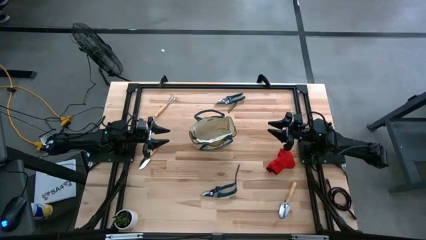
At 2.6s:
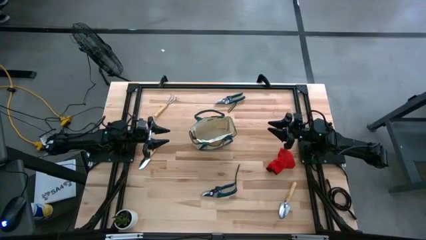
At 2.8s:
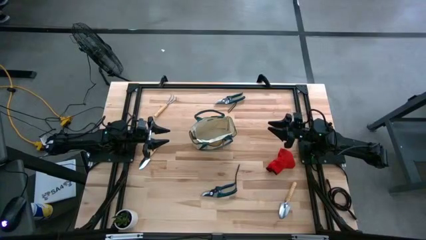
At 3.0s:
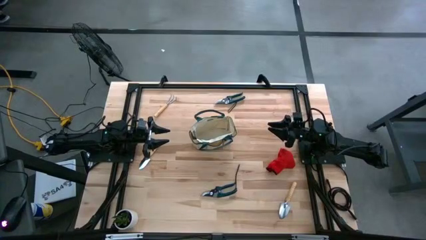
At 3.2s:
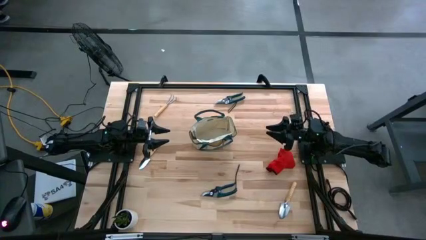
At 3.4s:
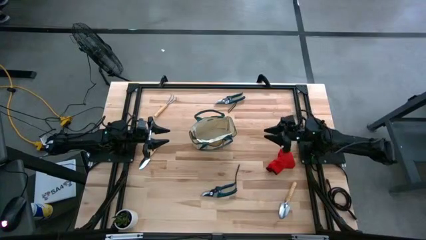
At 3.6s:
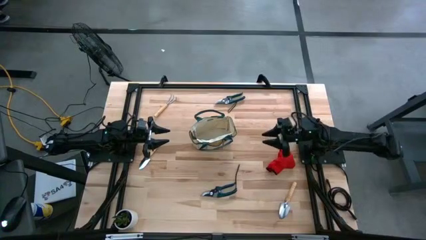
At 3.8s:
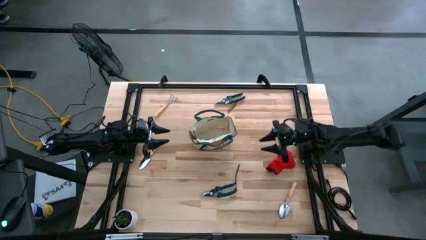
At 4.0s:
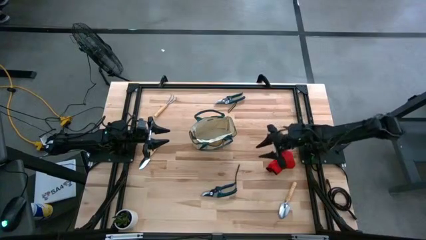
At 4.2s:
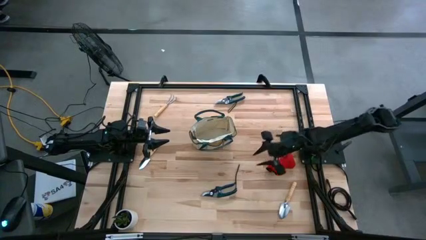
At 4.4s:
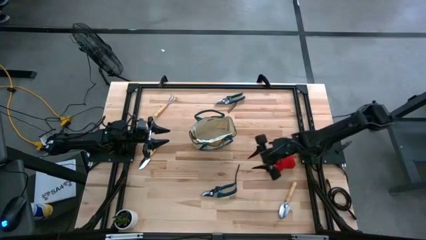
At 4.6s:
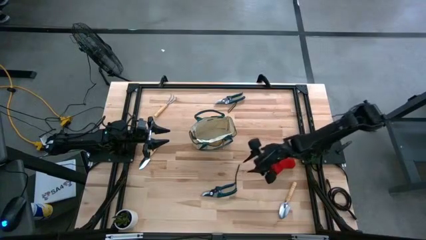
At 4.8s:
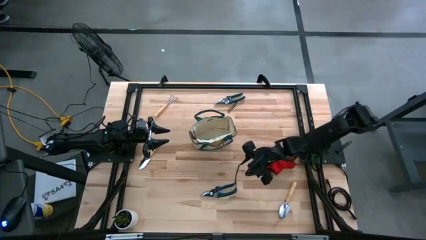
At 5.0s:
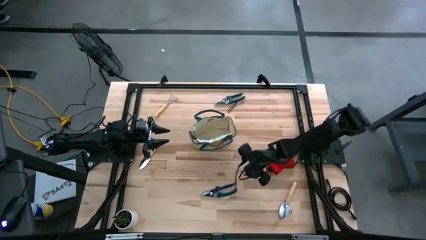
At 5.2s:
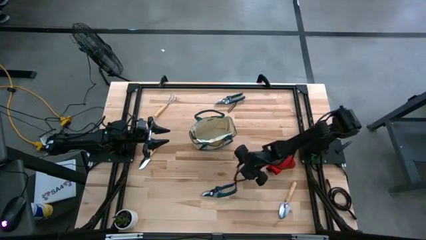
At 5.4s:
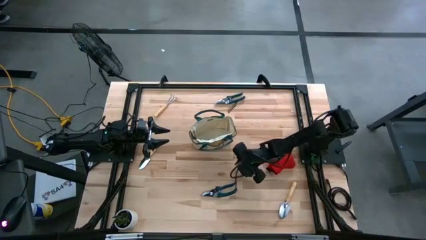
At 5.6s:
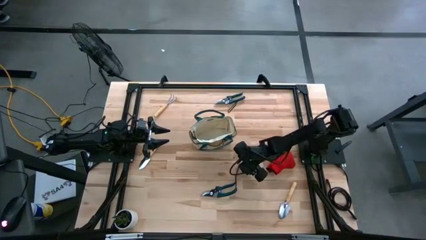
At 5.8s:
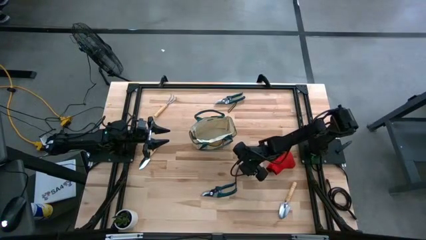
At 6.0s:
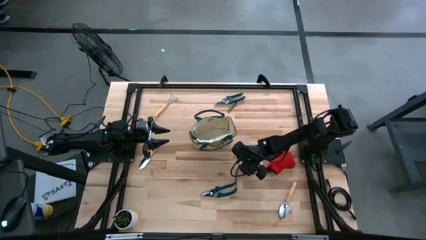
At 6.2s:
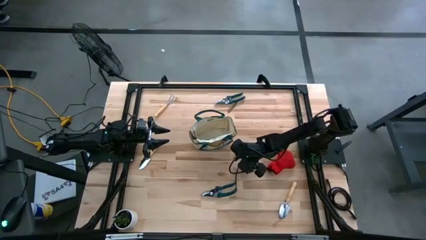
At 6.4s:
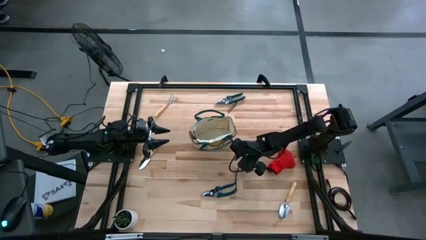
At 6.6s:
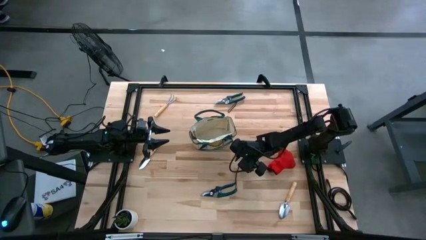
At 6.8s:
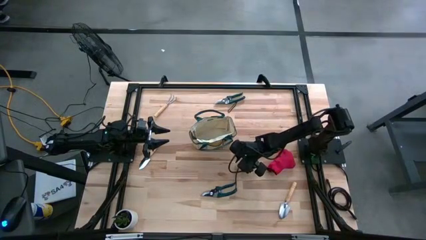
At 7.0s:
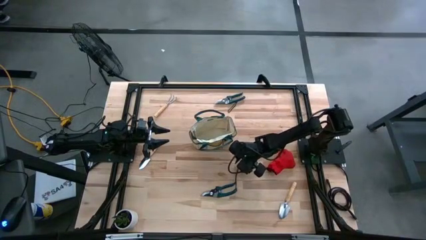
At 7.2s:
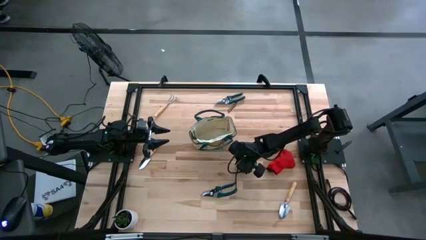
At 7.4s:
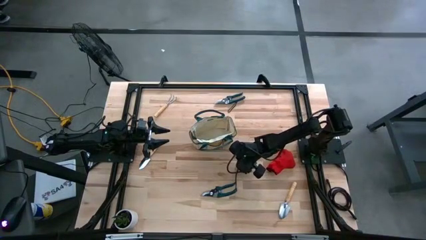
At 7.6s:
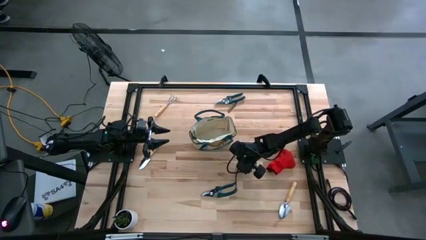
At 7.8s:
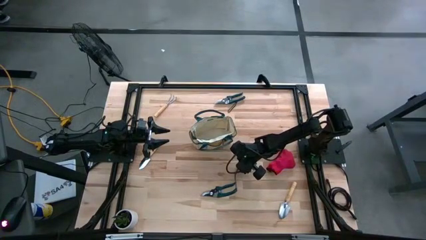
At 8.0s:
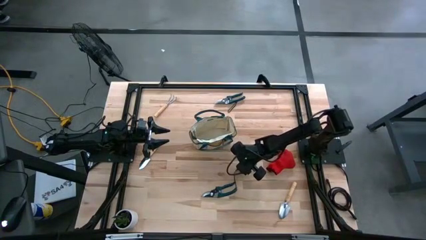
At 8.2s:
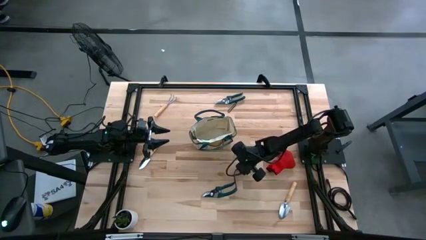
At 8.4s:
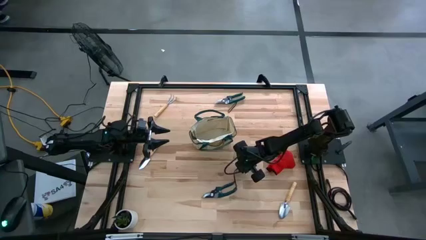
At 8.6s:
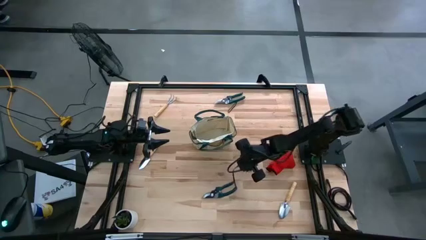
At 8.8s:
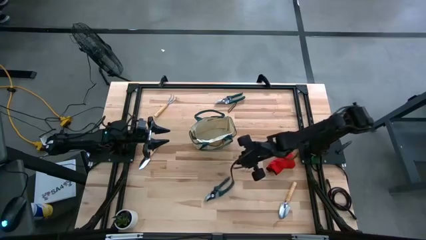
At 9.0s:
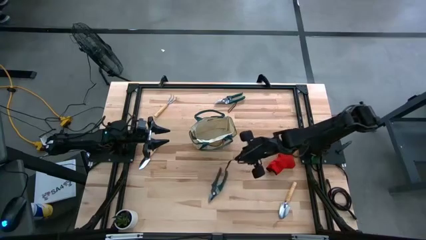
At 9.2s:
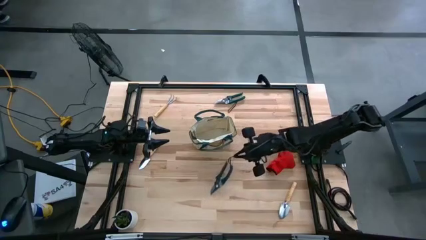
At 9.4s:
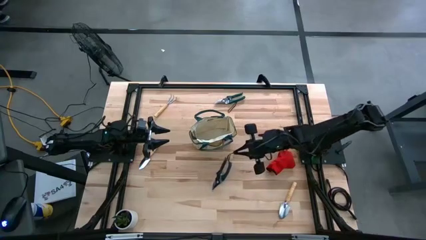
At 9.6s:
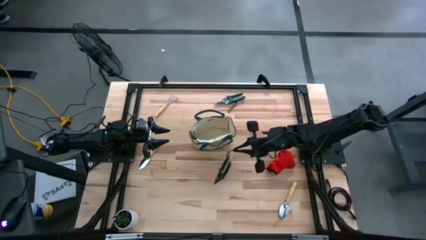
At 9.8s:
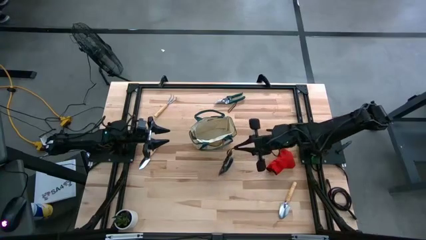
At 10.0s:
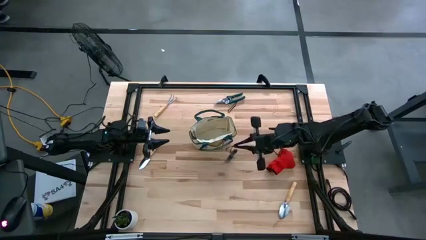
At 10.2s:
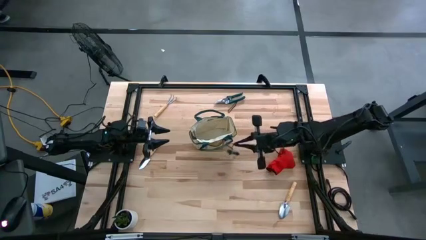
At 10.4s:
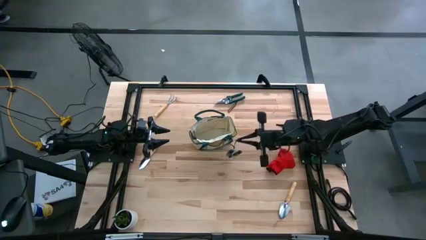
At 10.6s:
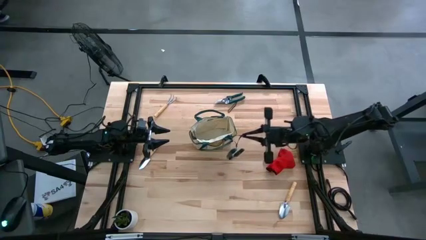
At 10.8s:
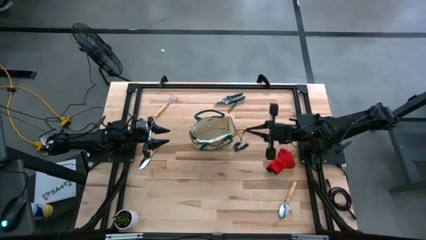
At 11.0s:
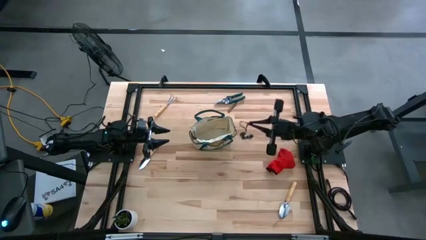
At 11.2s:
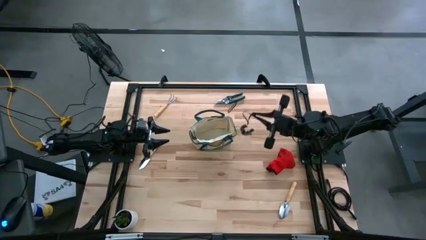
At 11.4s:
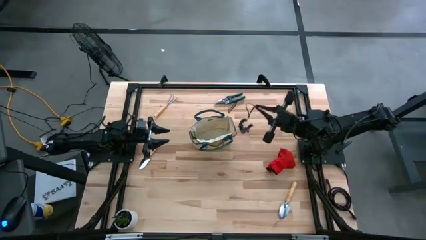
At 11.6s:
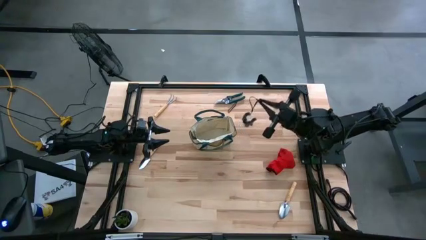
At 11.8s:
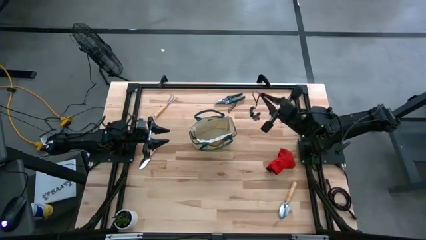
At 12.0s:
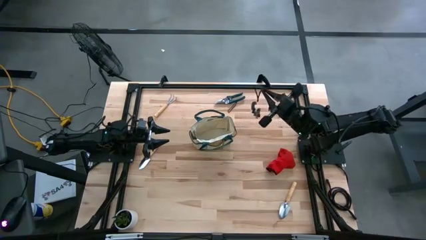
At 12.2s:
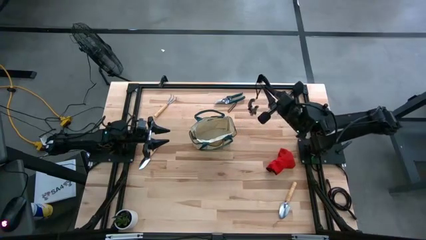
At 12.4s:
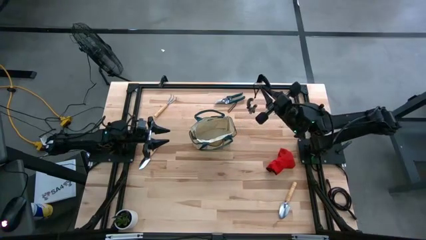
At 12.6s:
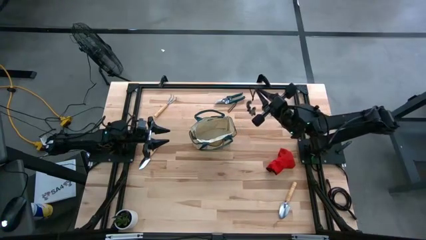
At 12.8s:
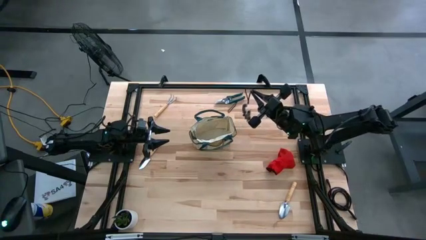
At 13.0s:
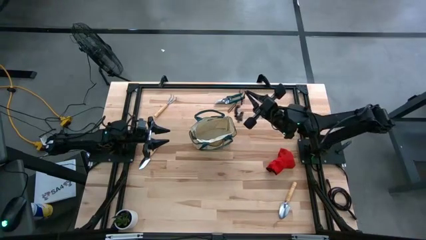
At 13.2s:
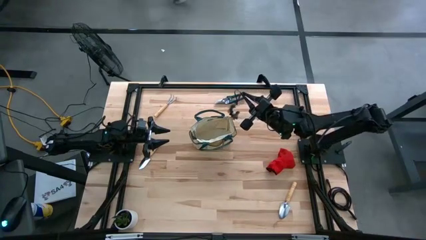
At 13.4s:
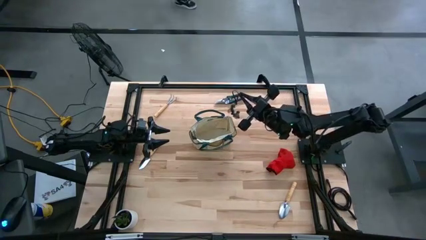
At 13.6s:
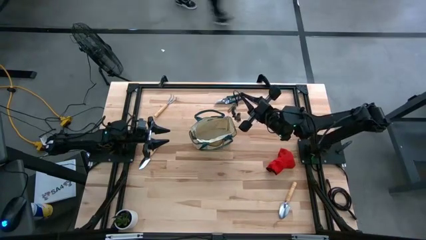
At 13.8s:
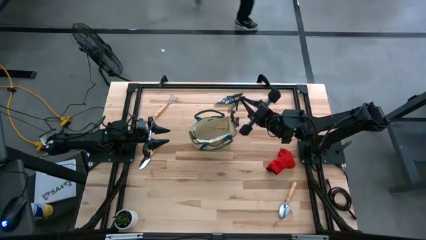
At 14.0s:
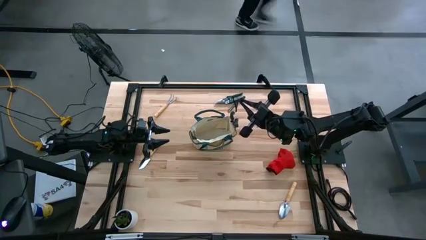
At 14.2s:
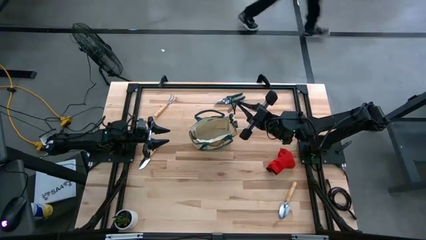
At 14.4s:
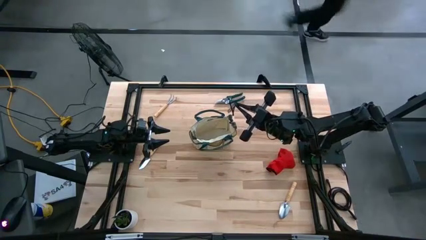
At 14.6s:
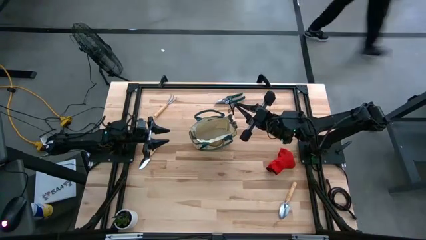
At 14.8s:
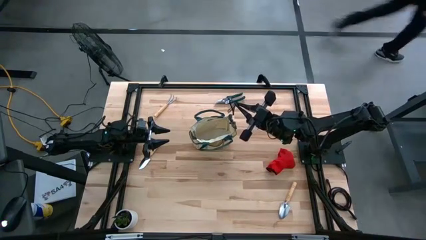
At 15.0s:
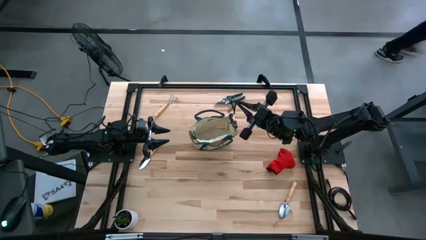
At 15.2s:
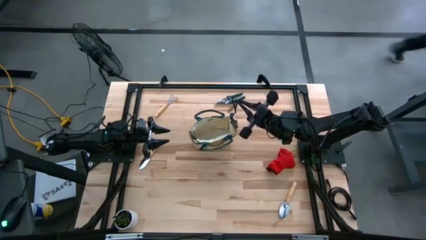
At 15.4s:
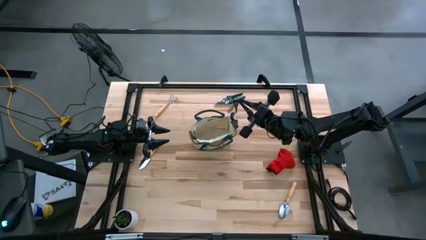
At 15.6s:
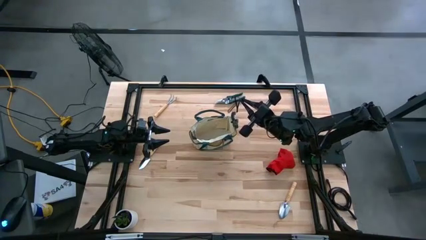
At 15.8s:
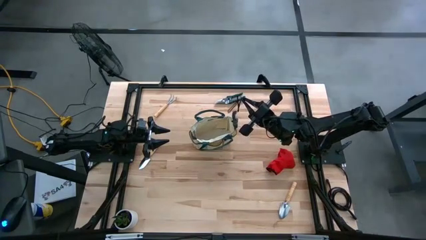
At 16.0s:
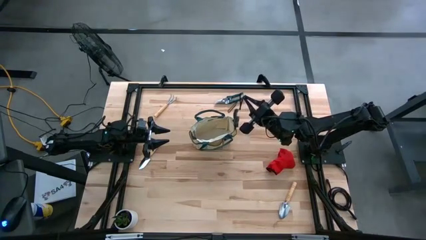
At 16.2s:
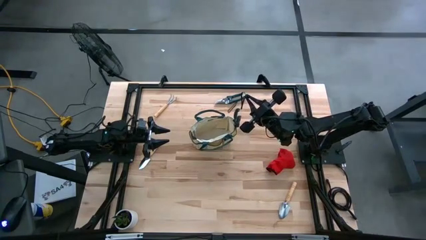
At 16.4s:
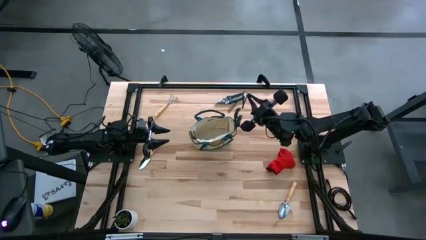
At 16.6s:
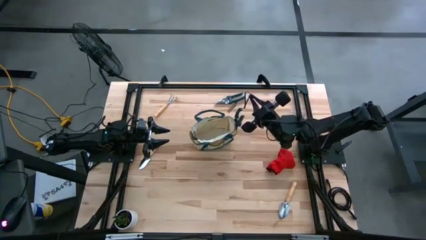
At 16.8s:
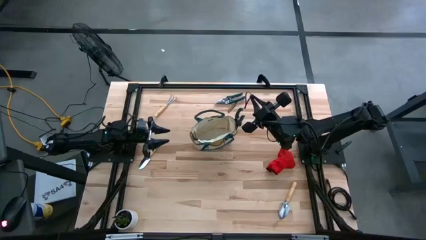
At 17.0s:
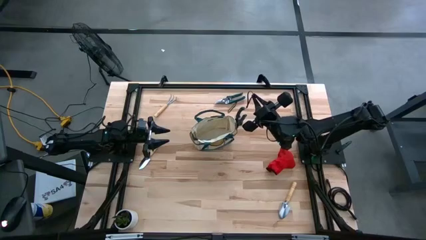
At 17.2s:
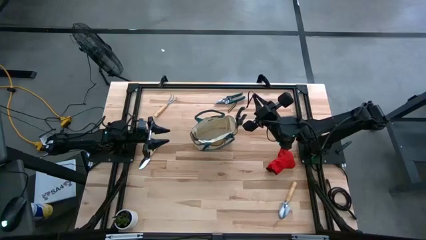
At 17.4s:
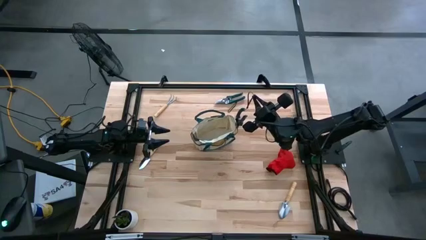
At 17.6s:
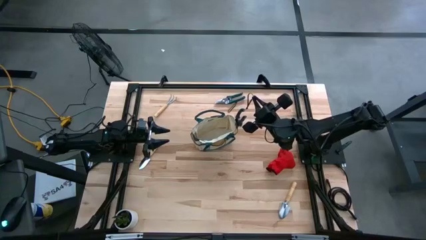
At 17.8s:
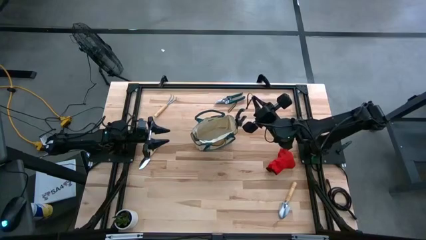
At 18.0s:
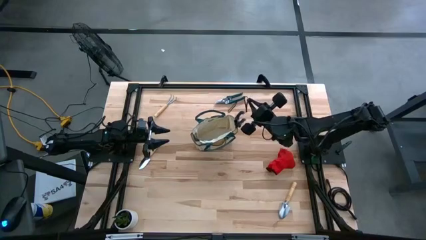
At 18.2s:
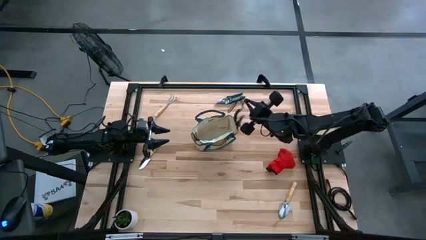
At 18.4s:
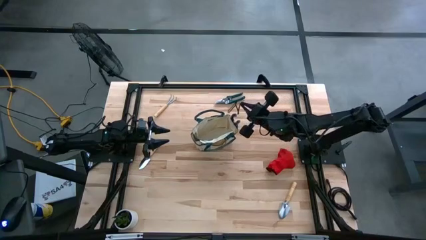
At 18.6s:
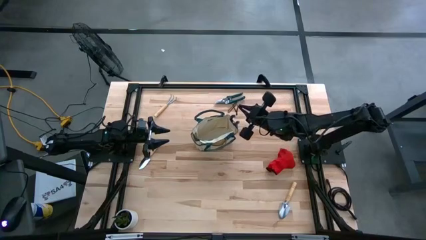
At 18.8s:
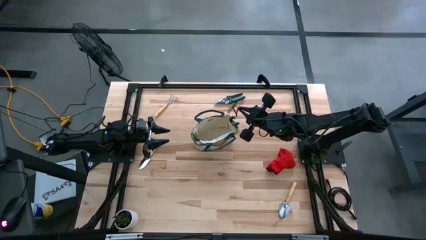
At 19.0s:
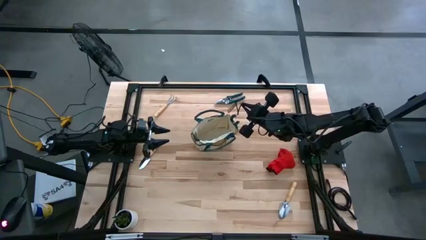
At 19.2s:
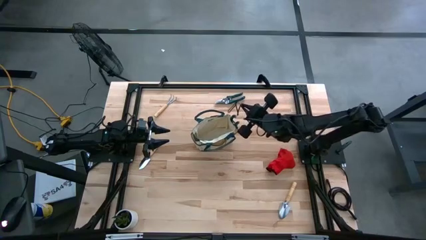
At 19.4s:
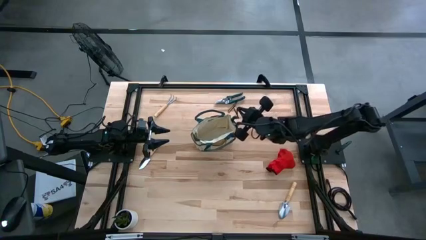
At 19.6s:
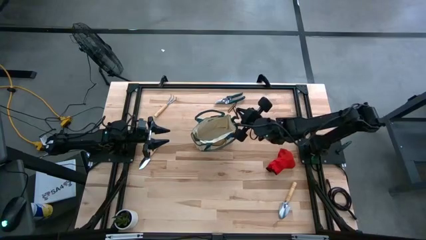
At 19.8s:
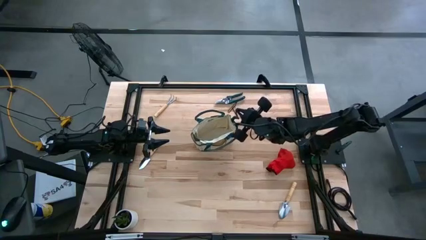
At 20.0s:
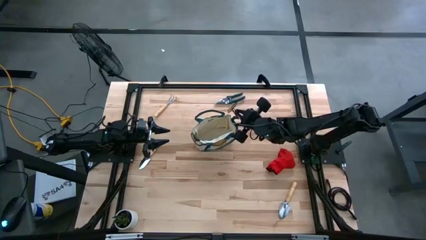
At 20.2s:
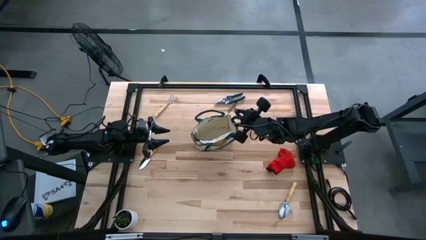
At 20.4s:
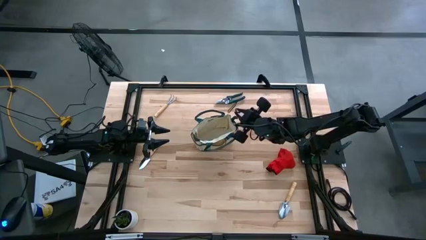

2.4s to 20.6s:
Task: Pick & Place Garden tools in Gardening bag
Put the bottom shear scissors into the gardening bag
